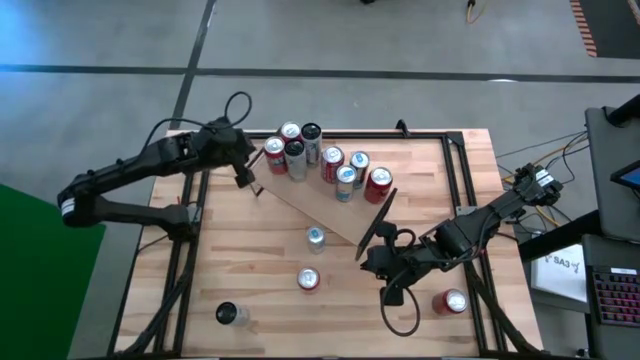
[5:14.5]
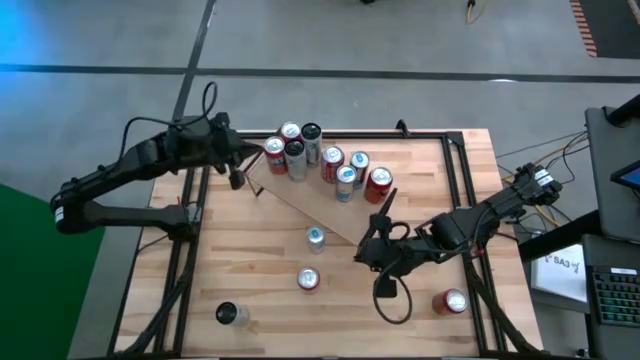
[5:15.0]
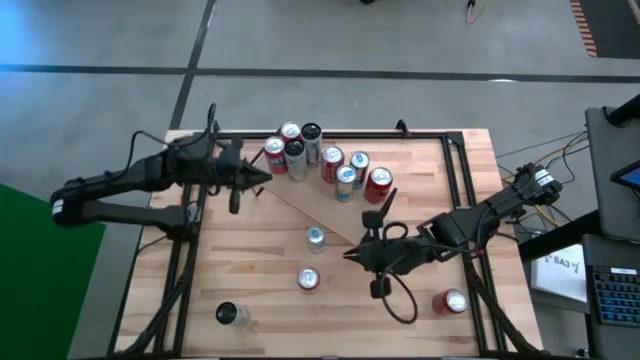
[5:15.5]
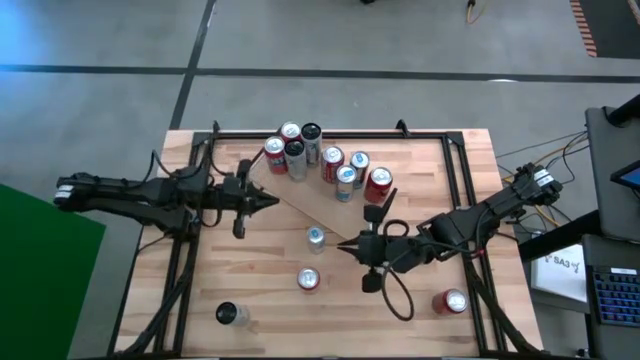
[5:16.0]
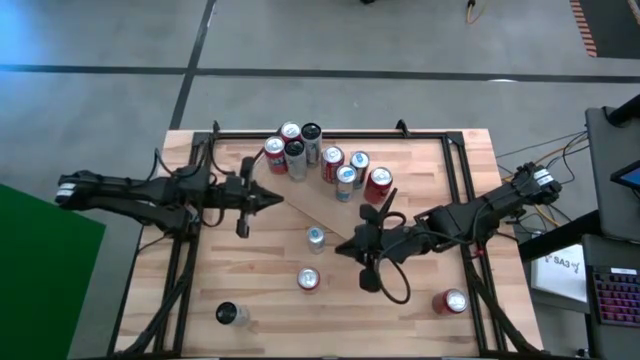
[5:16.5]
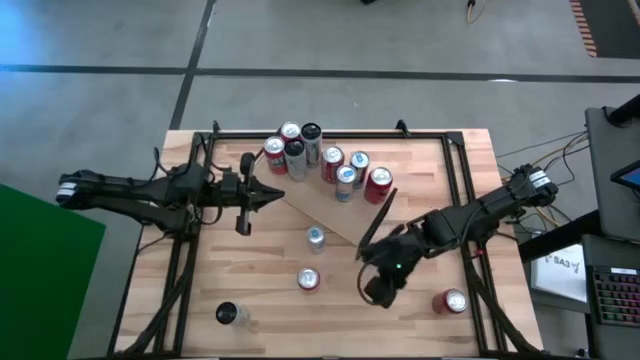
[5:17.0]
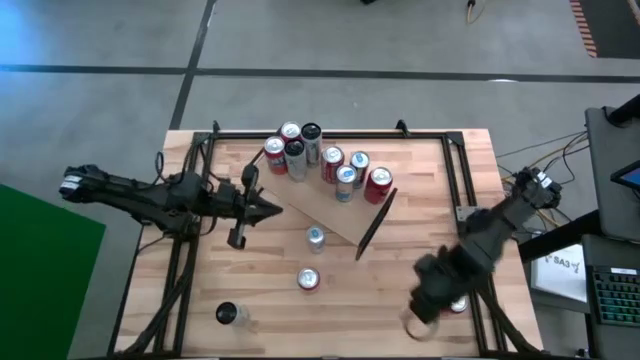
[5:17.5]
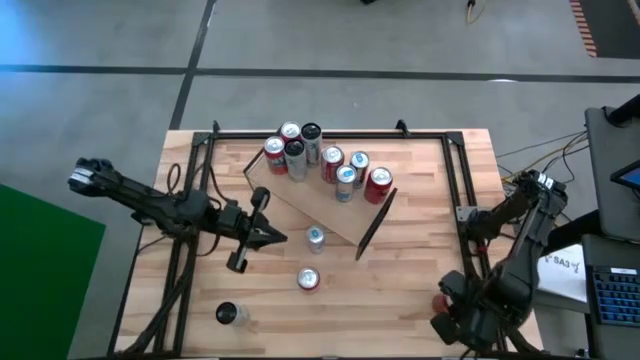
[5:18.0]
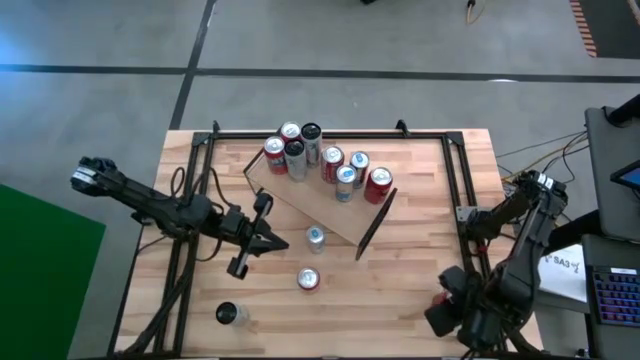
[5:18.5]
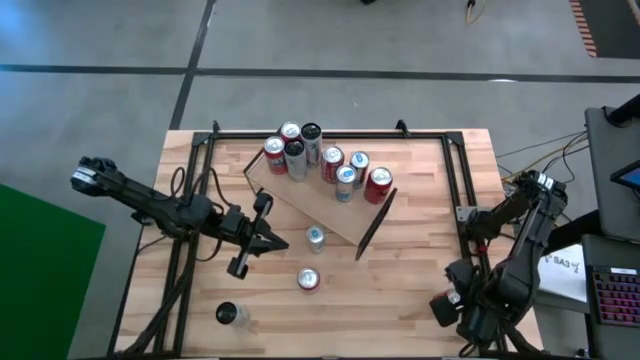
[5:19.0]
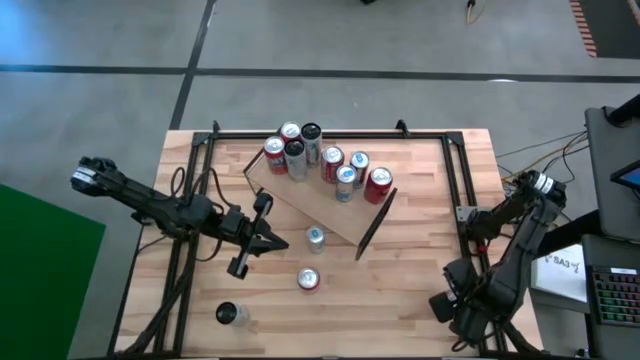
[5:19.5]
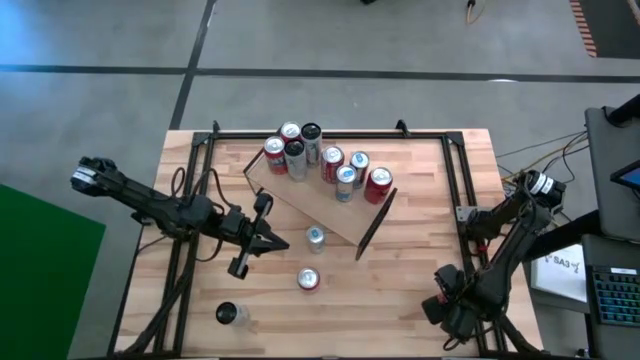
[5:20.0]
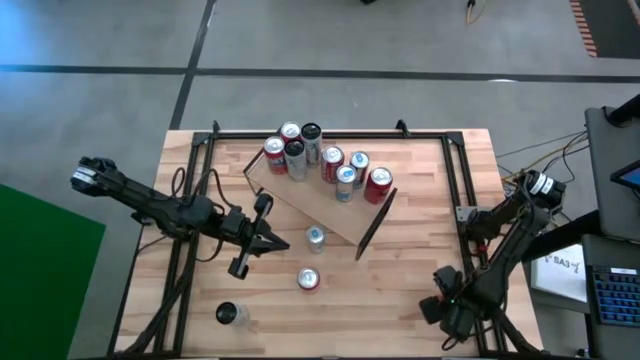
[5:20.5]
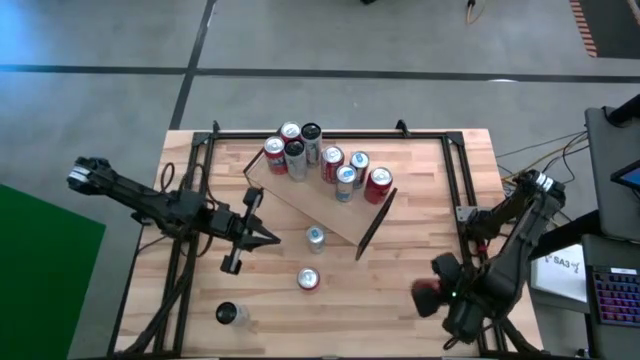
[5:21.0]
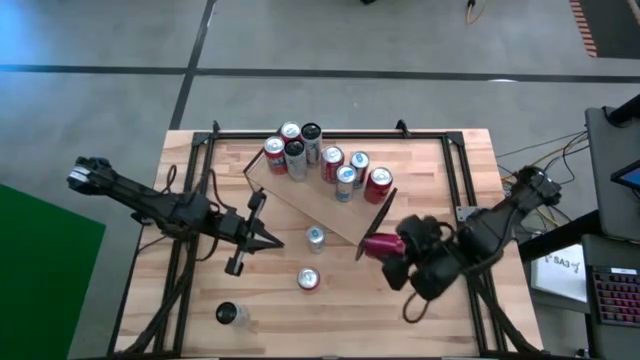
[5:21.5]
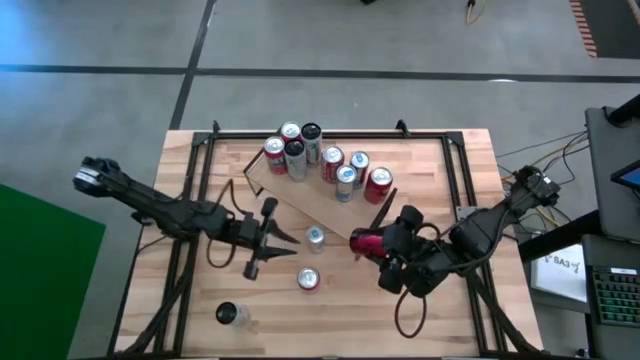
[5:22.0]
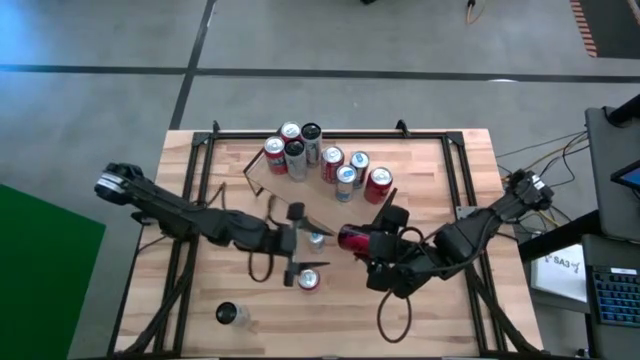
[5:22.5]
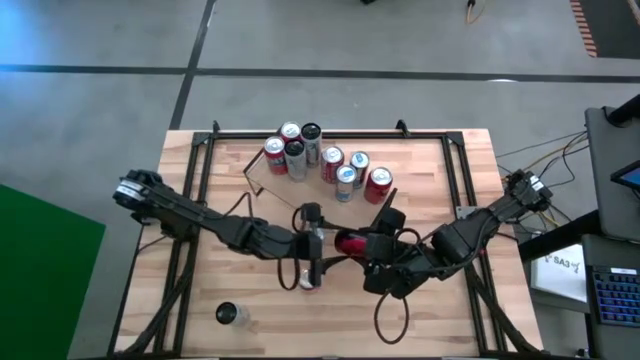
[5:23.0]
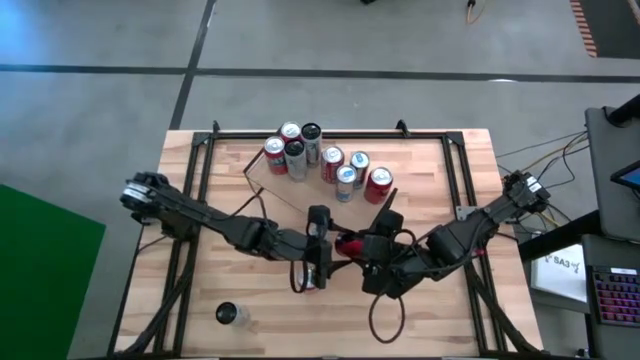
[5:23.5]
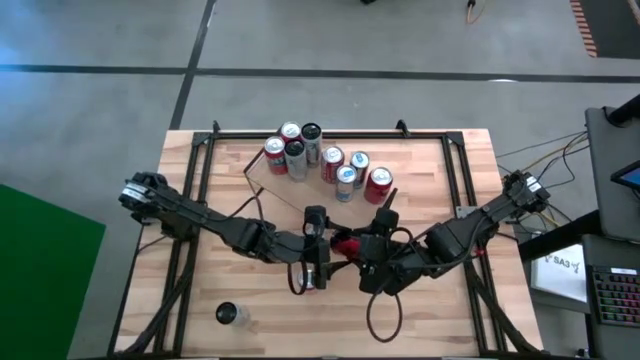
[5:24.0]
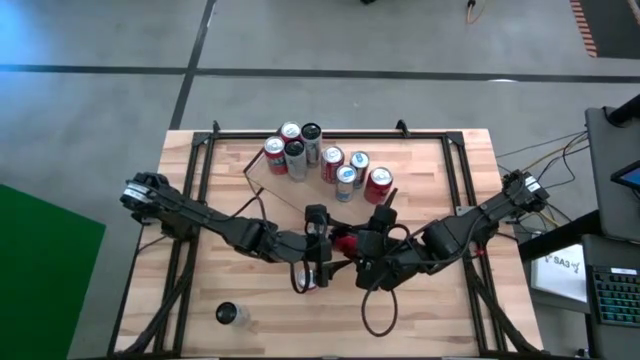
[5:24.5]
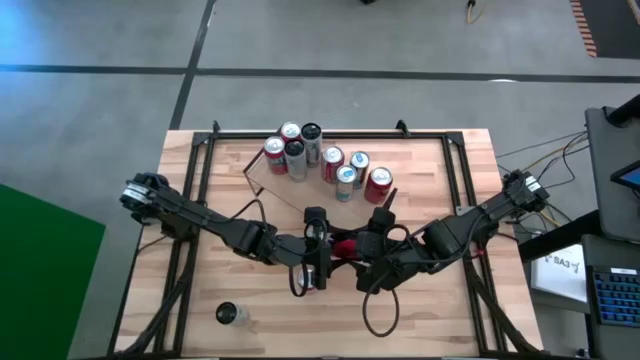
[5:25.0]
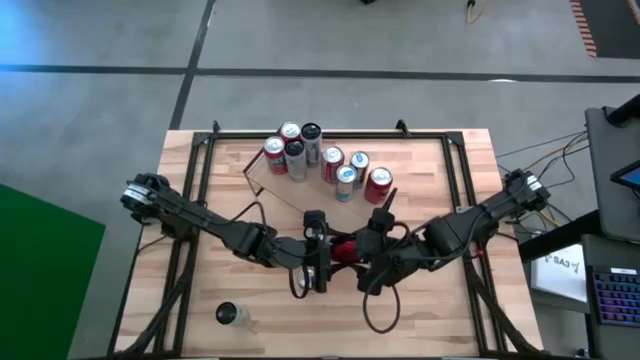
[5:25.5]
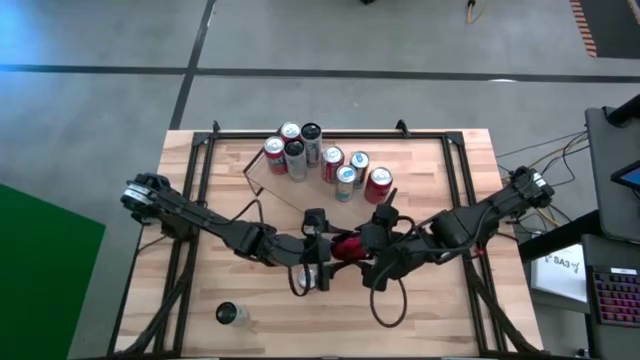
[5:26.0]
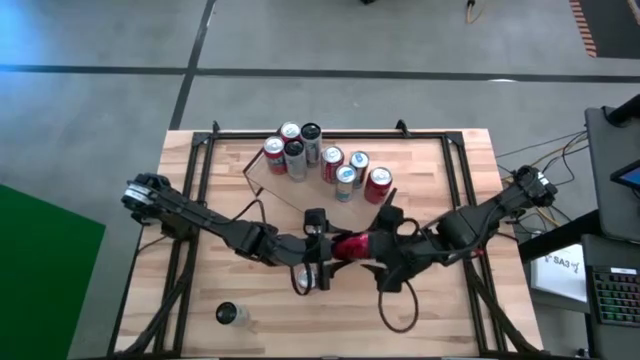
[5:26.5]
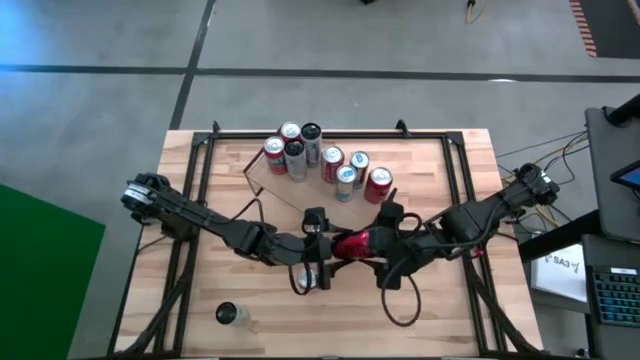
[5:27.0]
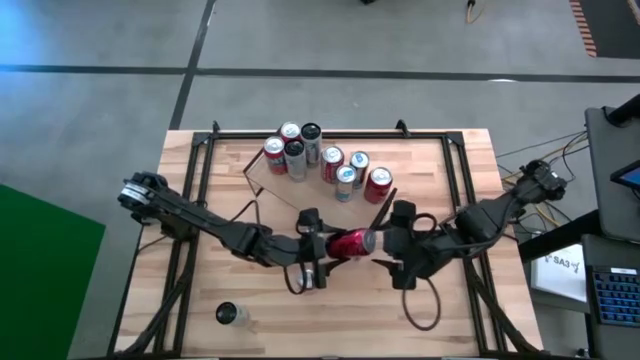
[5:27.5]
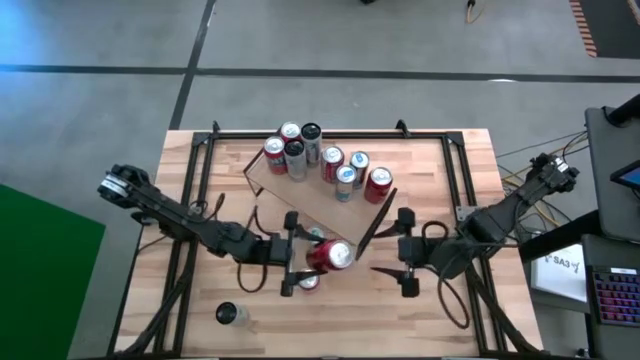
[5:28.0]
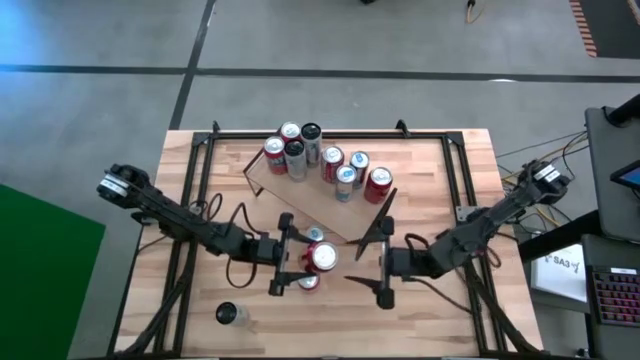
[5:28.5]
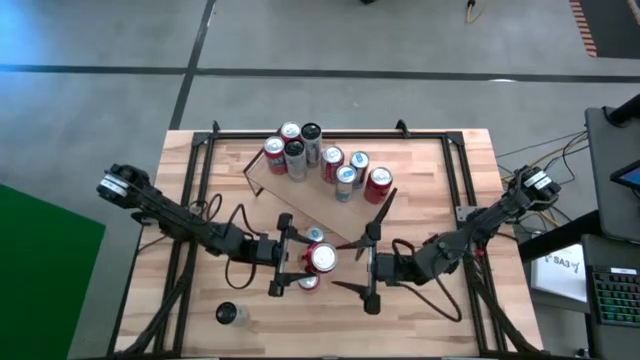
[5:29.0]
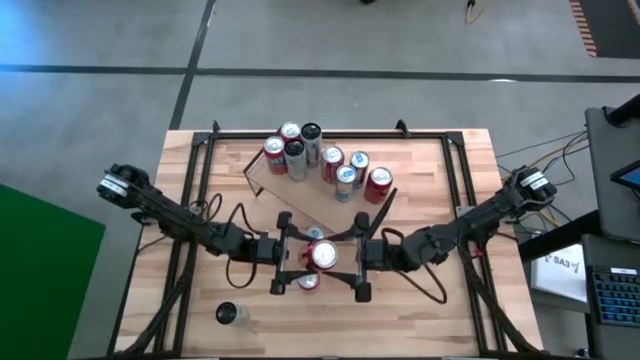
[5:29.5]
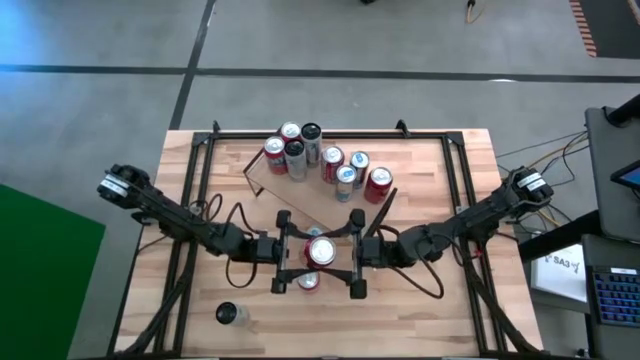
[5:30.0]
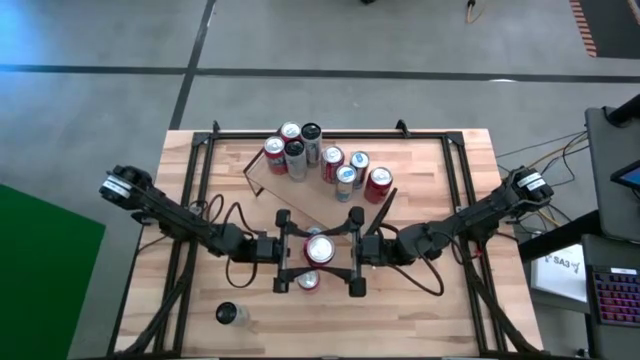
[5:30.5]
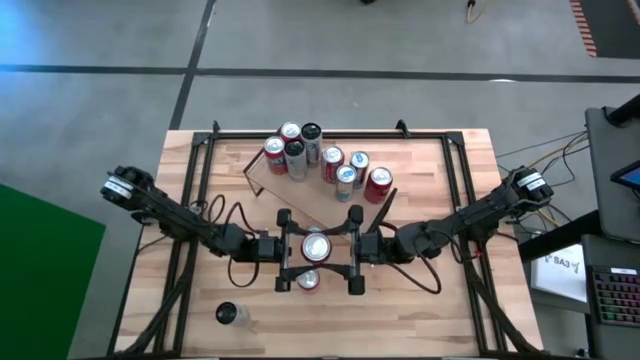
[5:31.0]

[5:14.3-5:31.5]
Task: Place canned beverage on shelf
Put the red/black soda can on the shelf, align with the other red/black soda can

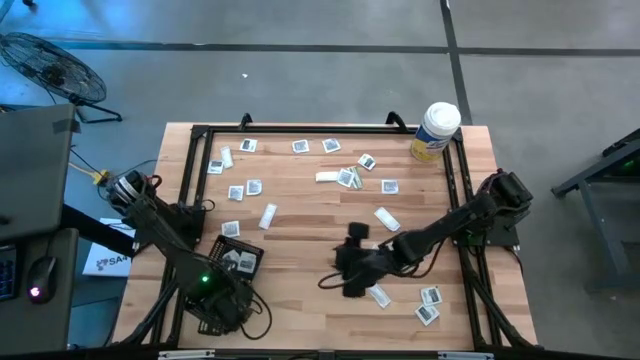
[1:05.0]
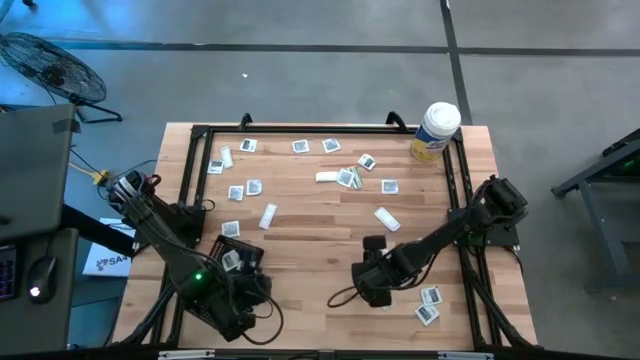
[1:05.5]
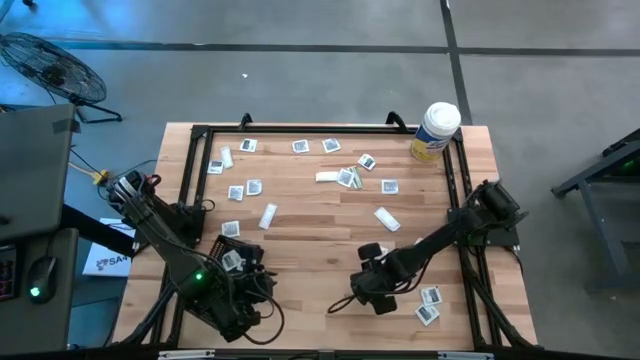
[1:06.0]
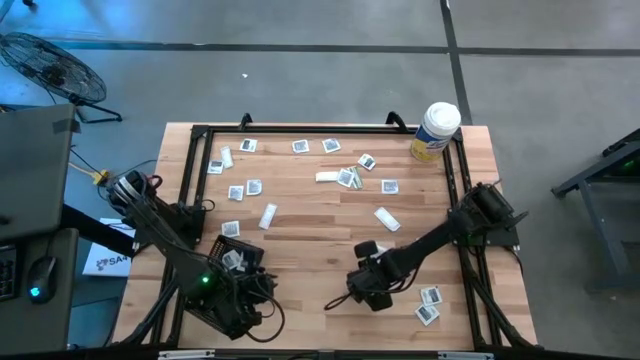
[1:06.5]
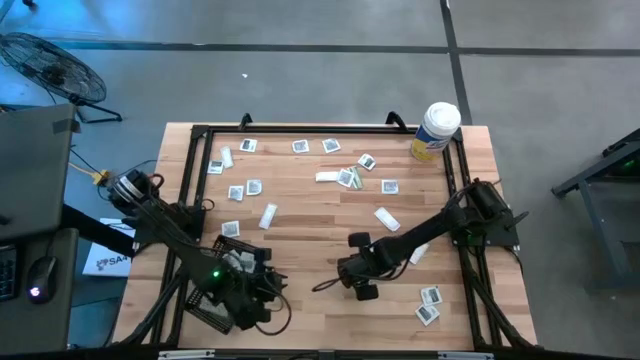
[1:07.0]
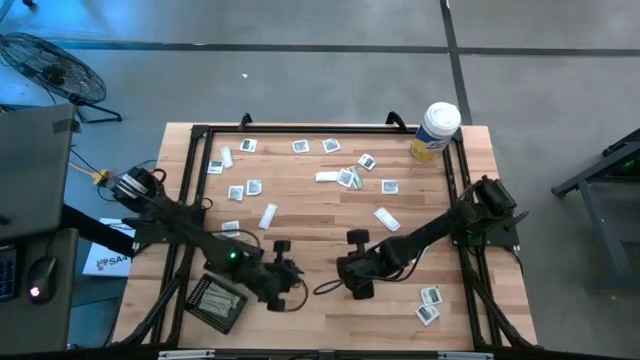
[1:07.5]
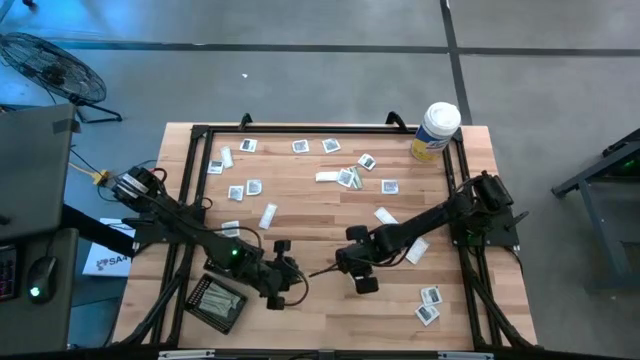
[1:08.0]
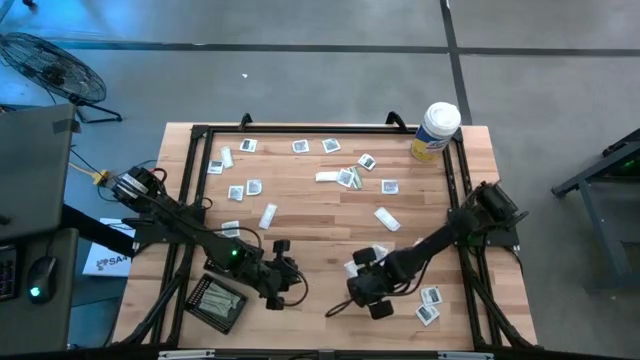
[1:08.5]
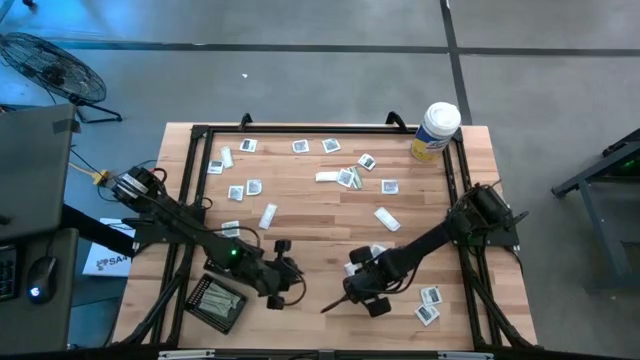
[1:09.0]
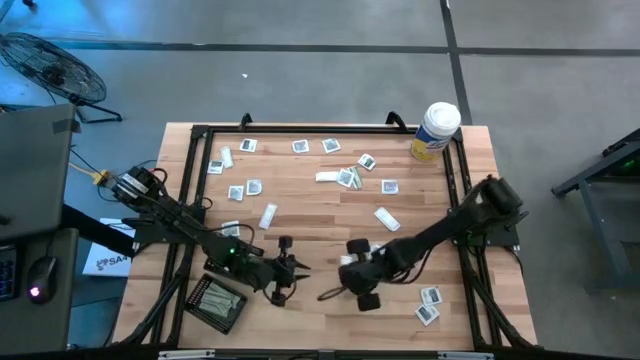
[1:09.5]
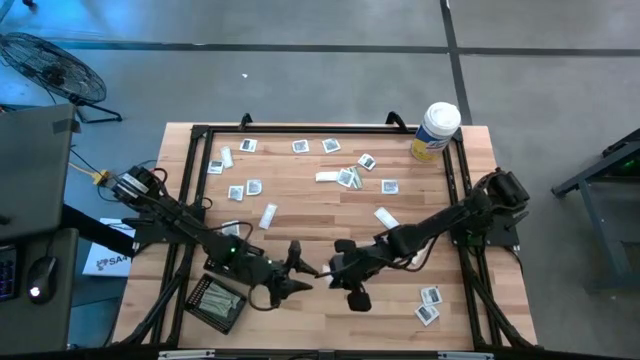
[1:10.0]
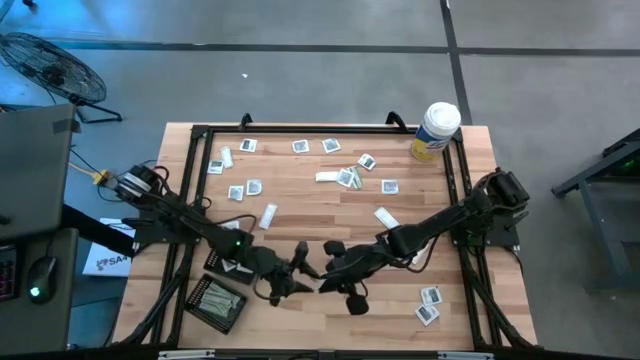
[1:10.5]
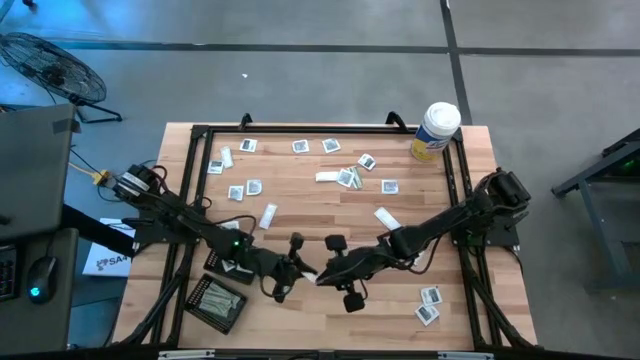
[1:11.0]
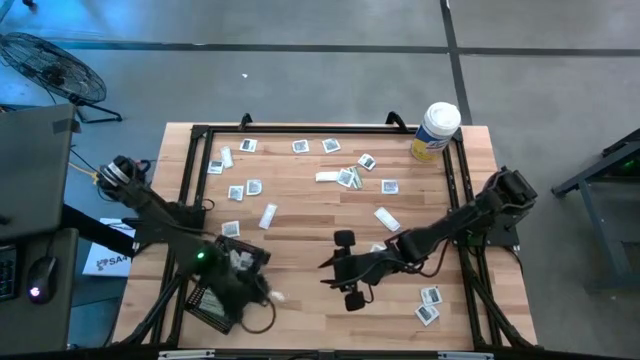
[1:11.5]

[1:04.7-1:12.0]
Task: Pick & Place First Aid Supplies
Put the bandage into the bottom black bin
